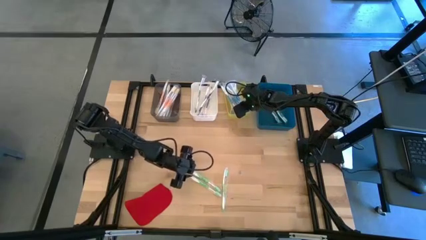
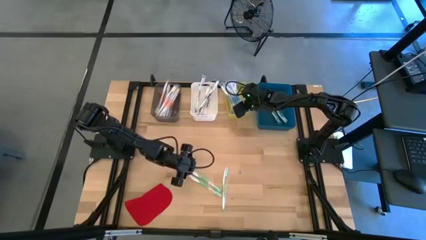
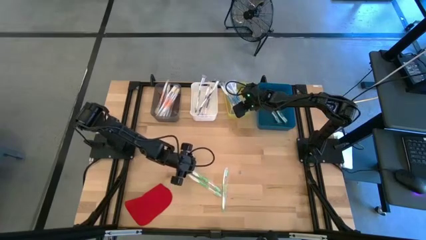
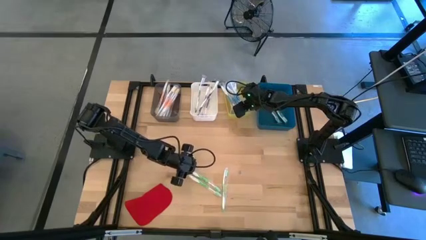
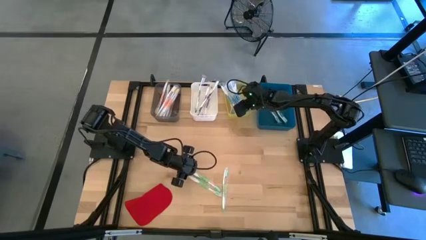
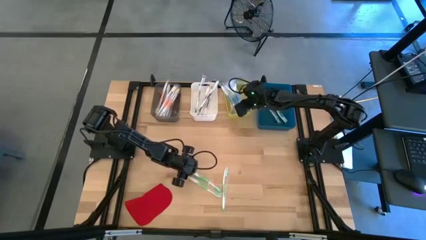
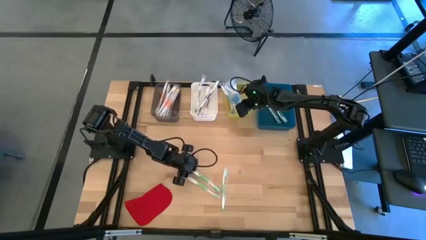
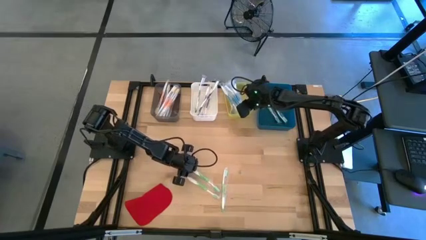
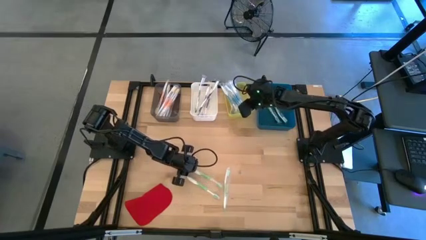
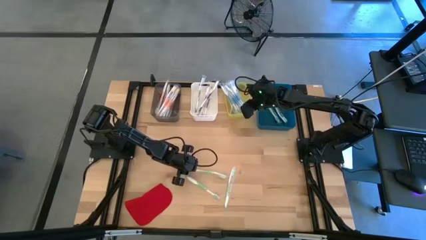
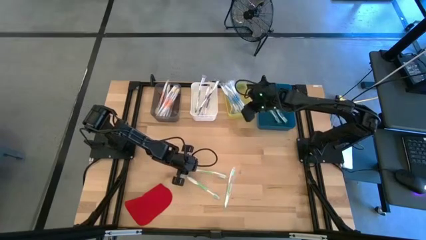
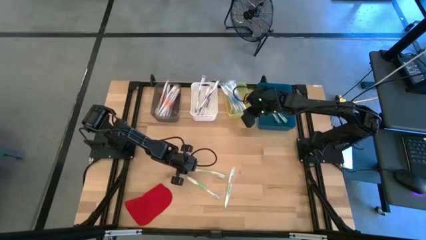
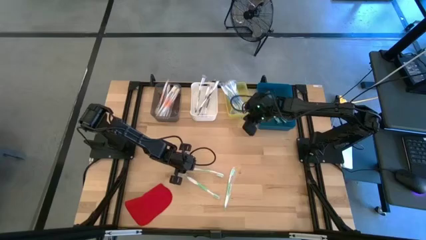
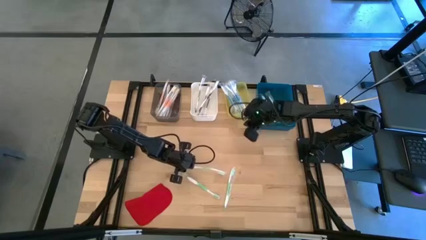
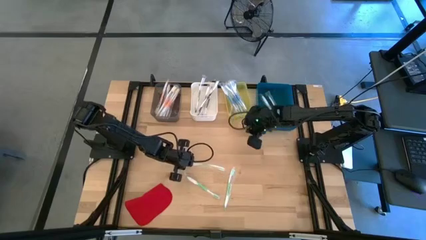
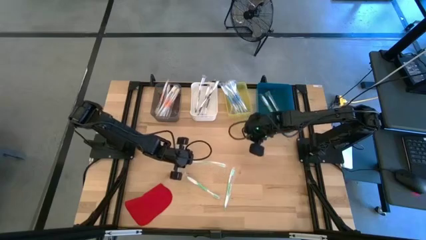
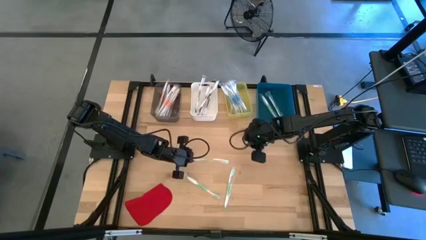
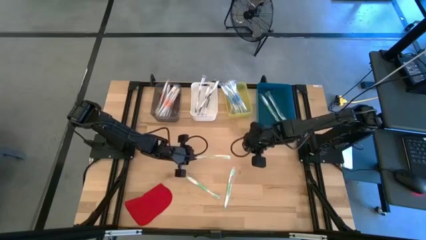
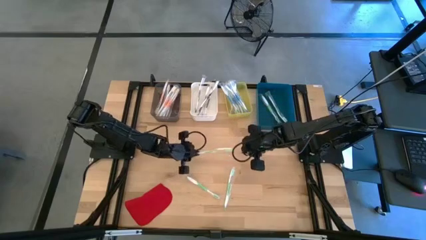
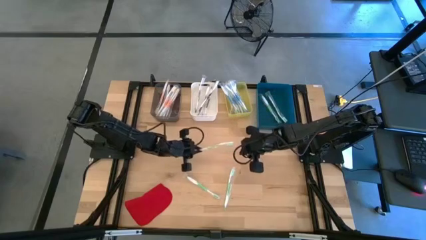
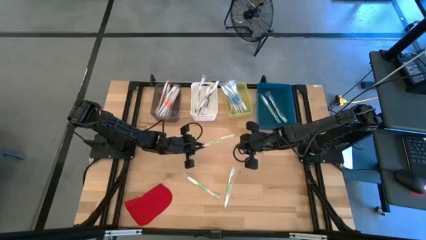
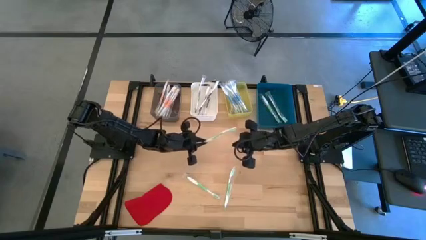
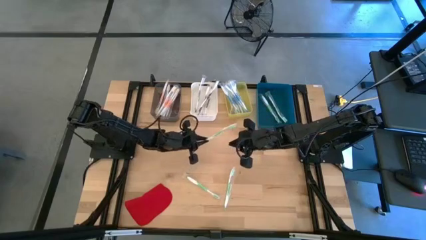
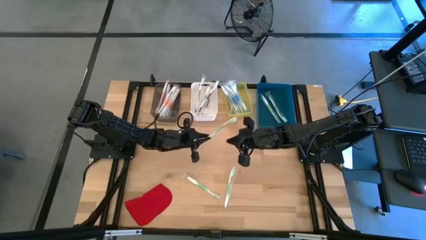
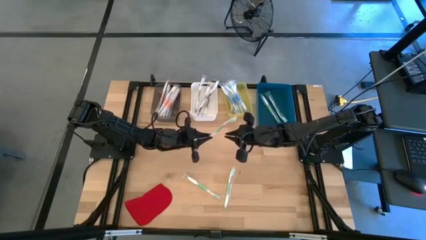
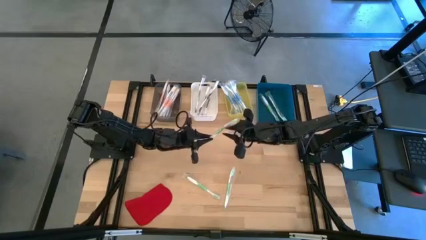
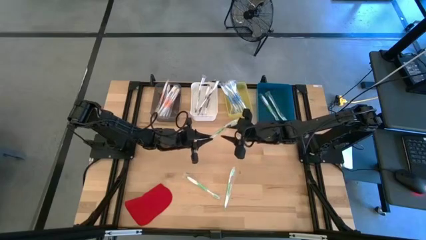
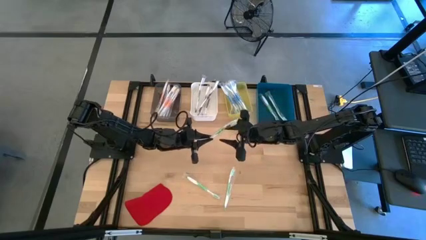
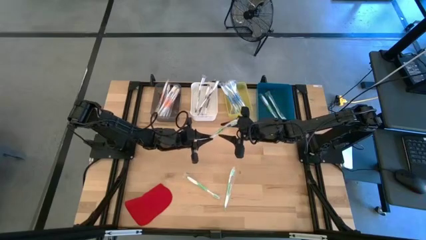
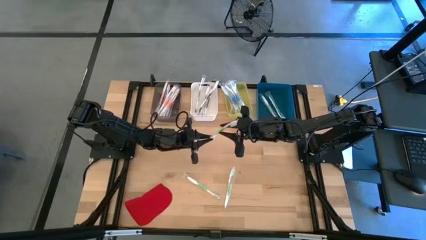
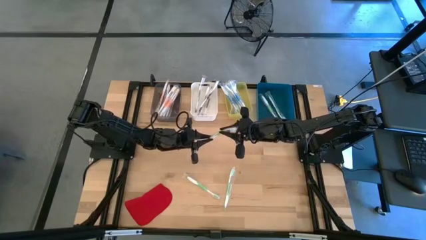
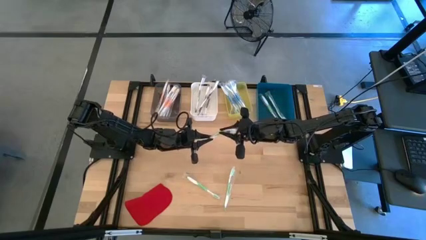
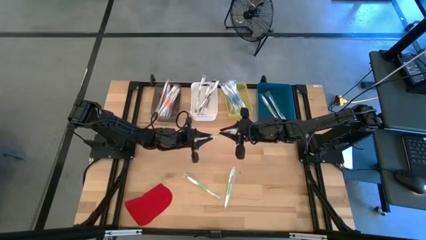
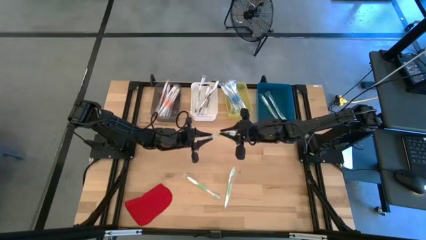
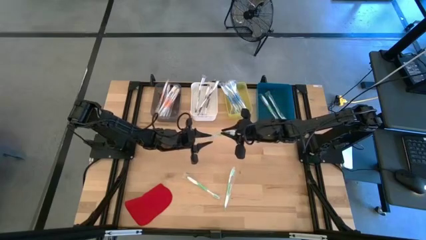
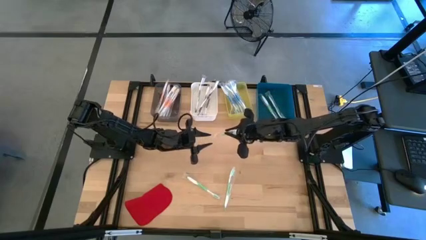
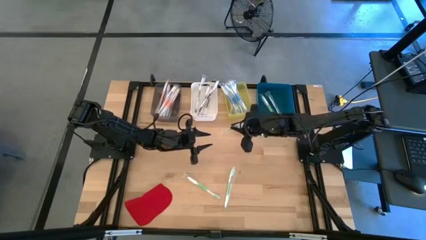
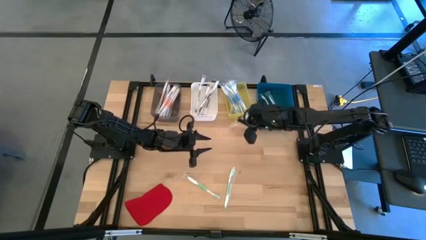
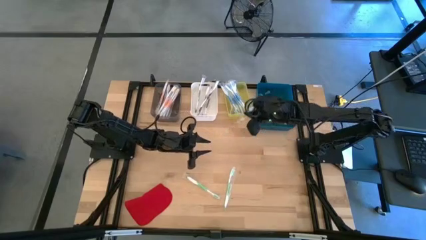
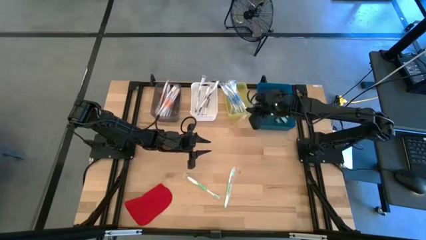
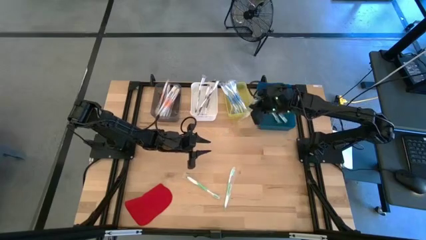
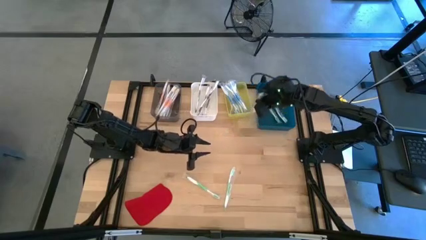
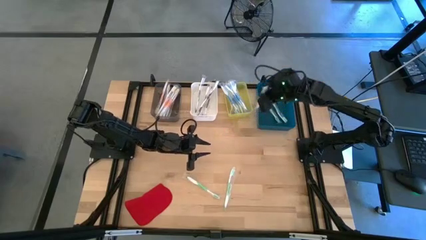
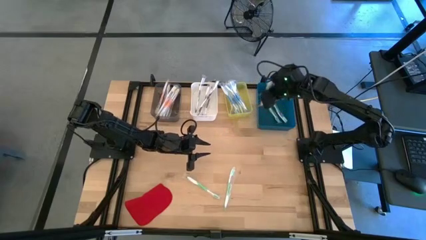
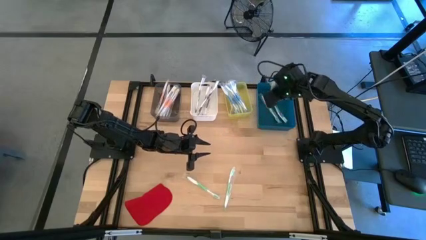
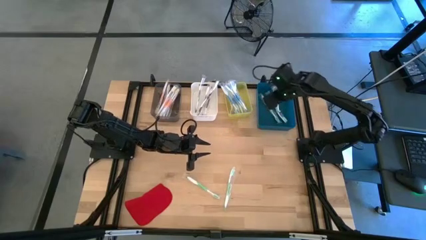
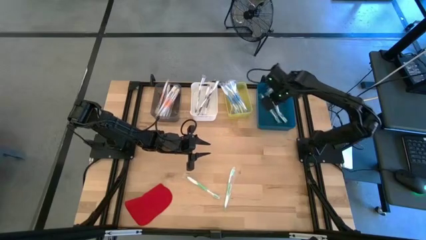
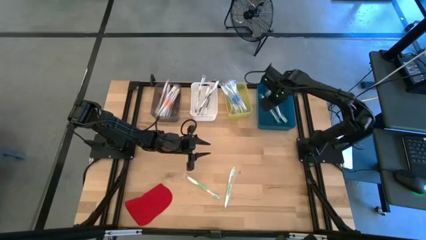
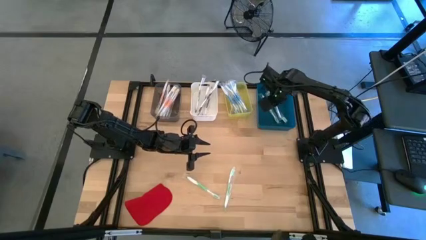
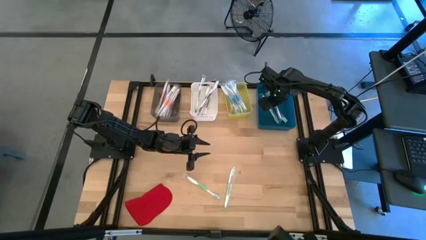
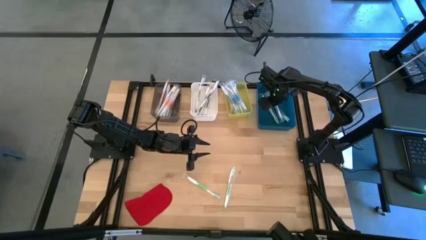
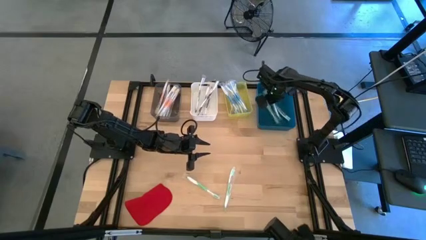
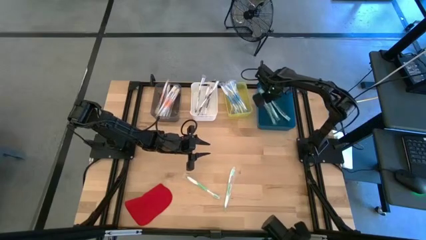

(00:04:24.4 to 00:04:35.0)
Task: Pick & Place Toothbrushes
Put the green toothbrush into the blue bin

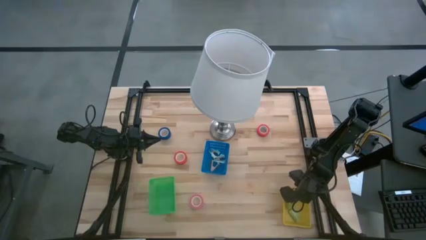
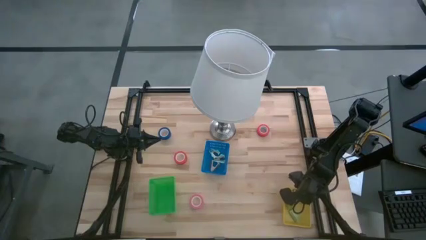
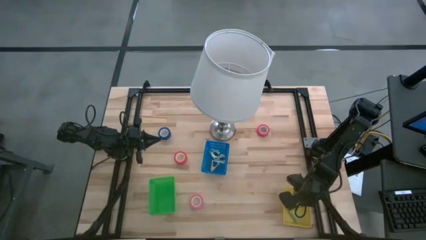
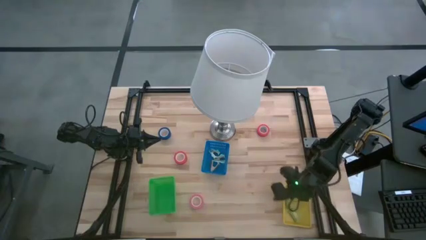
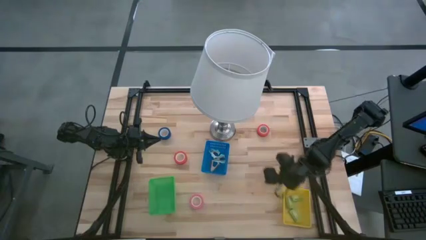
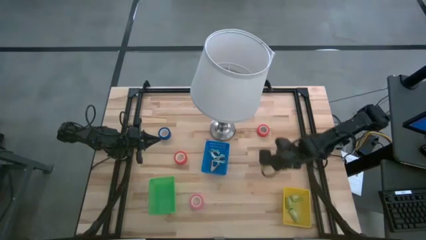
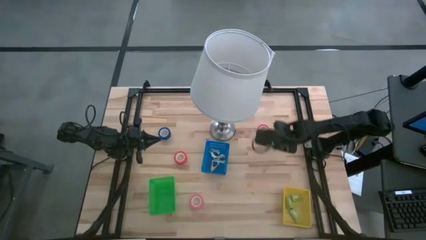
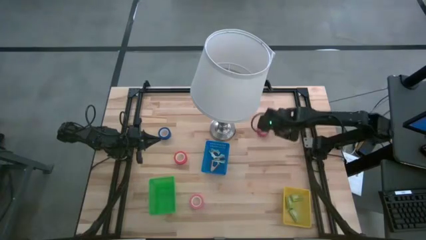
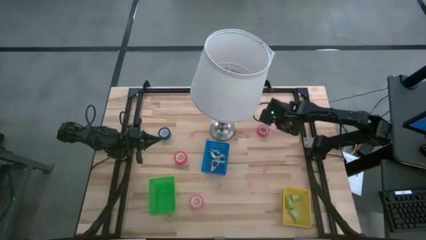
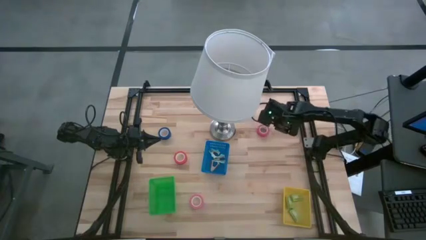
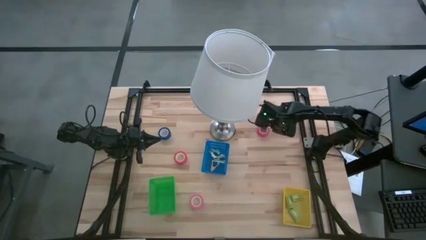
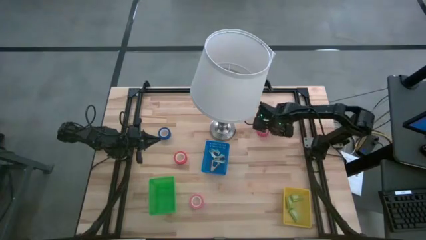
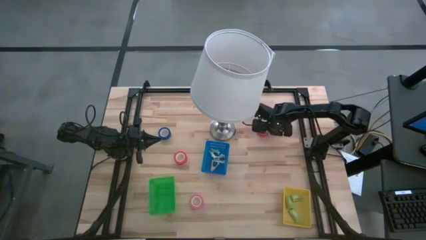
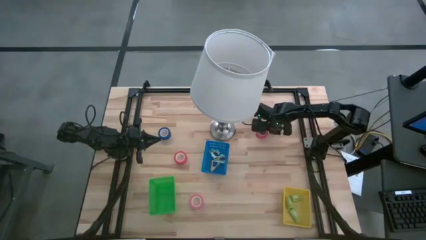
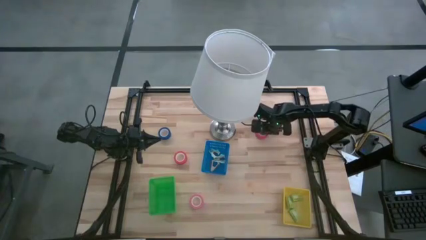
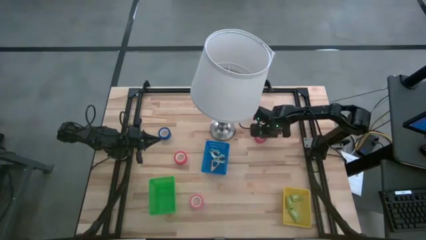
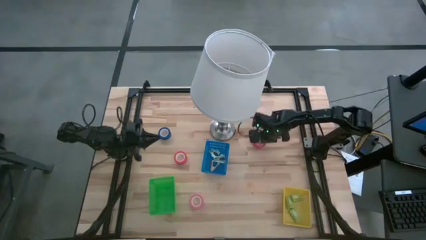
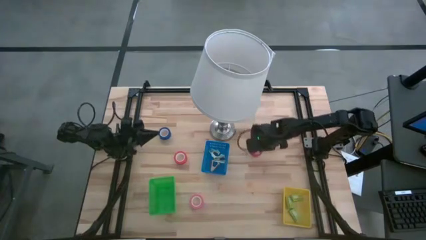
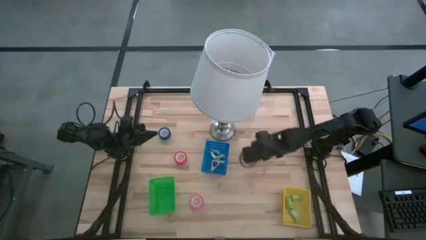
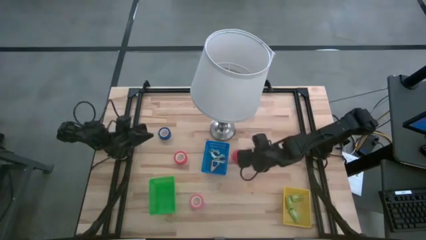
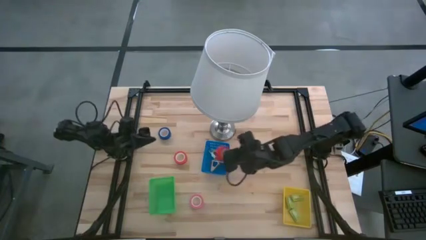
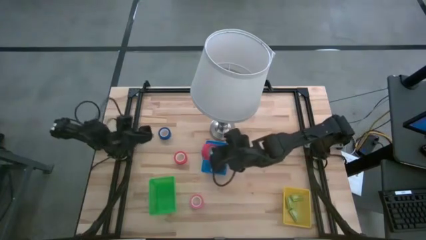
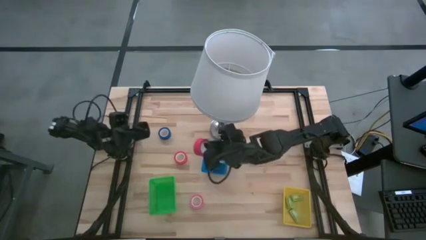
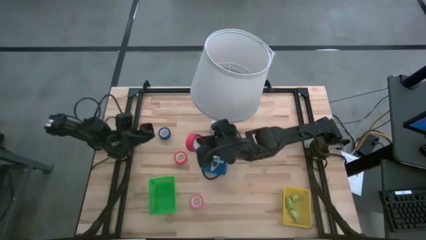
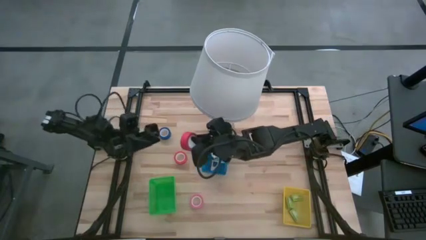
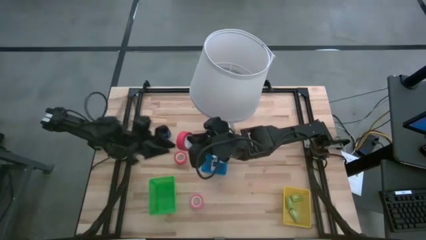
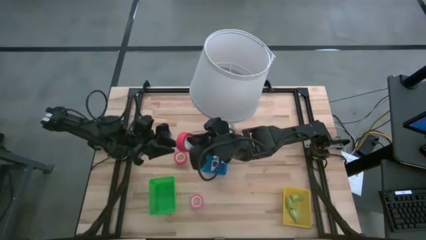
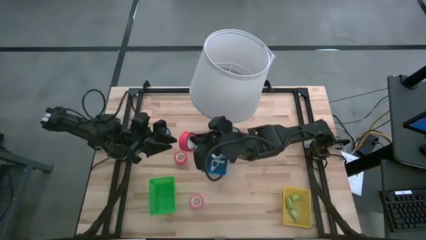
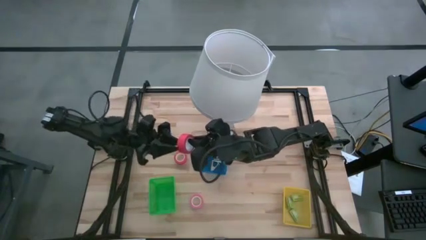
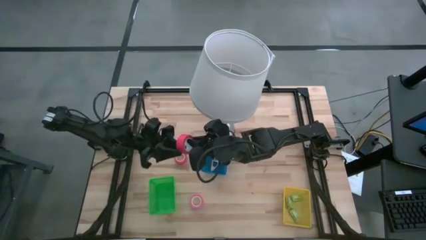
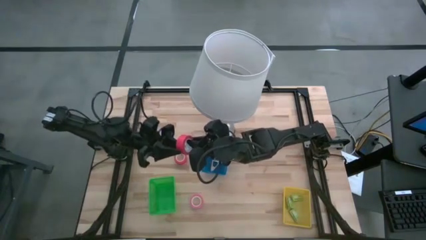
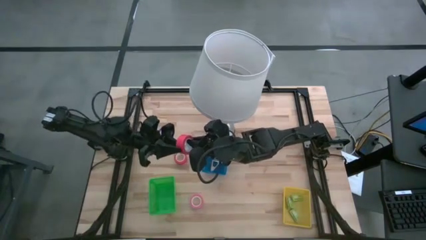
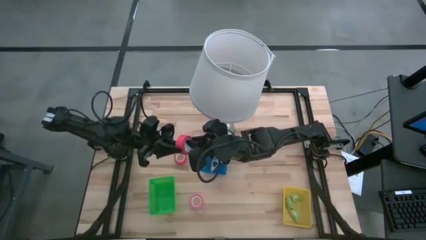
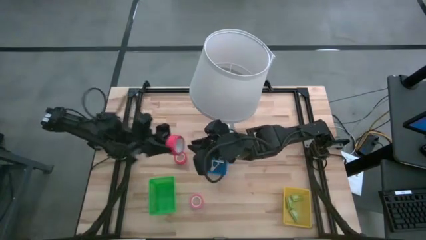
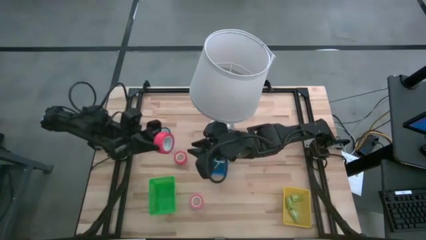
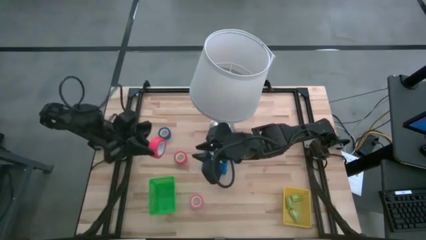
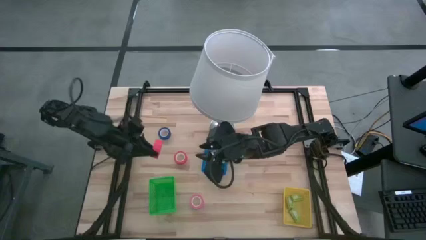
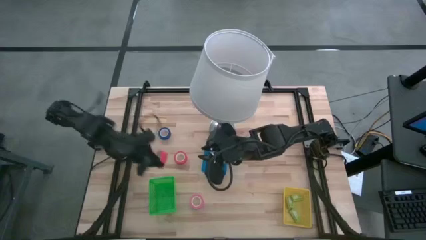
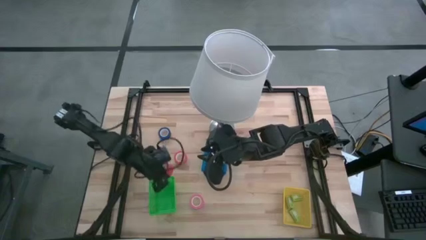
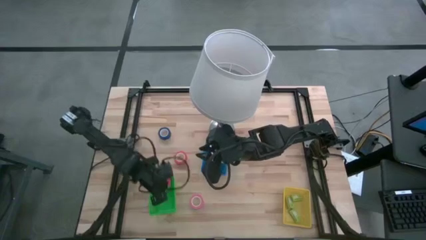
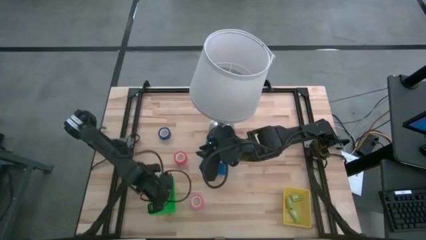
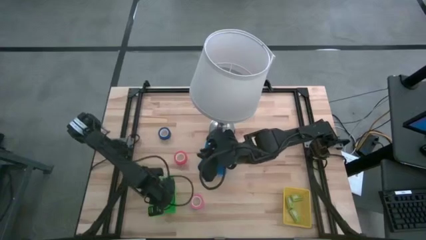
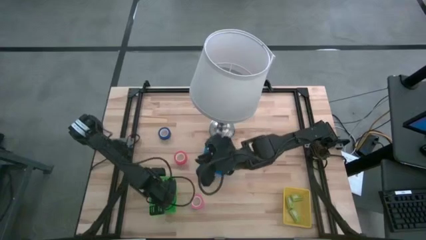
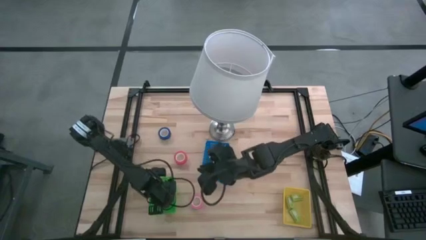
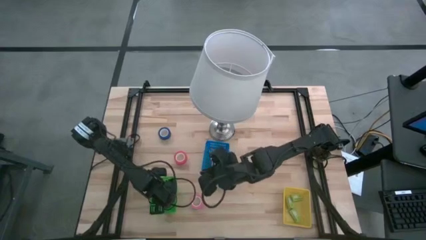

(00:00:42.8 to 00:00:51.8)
Task: Pick and place Stapler, Stapler remover, tape
Put the top orange tape into the green bin
